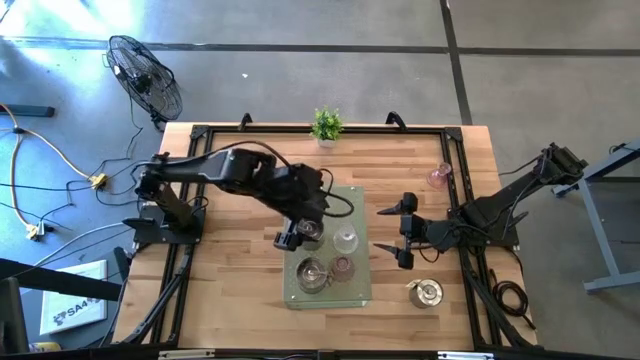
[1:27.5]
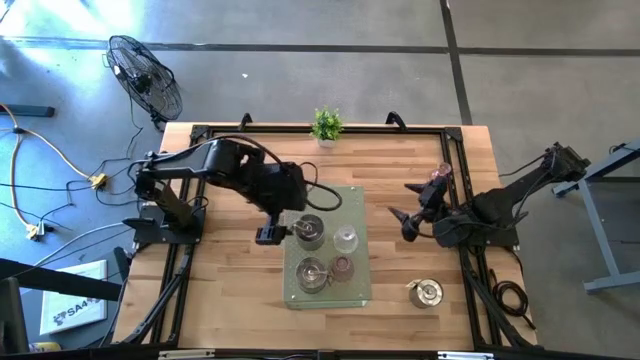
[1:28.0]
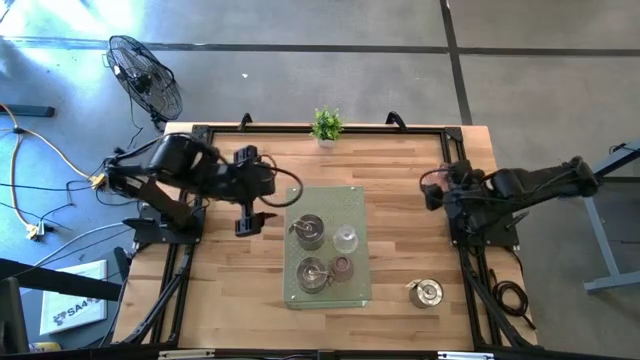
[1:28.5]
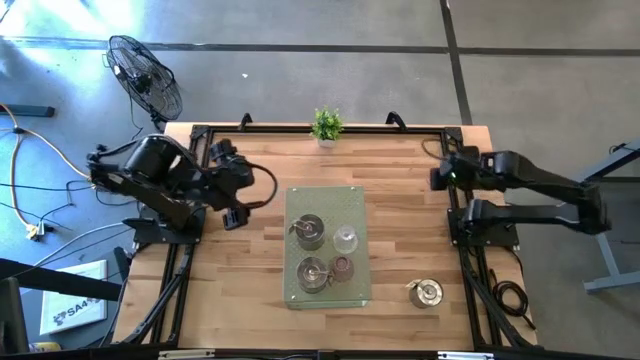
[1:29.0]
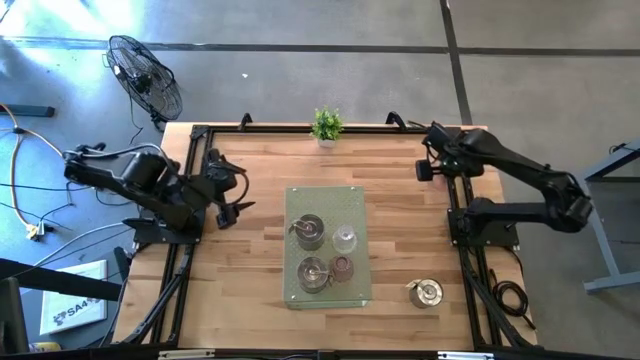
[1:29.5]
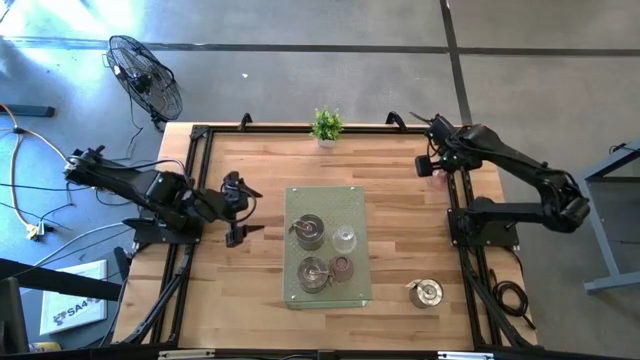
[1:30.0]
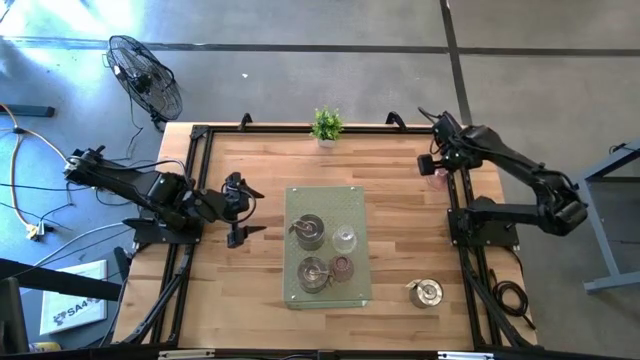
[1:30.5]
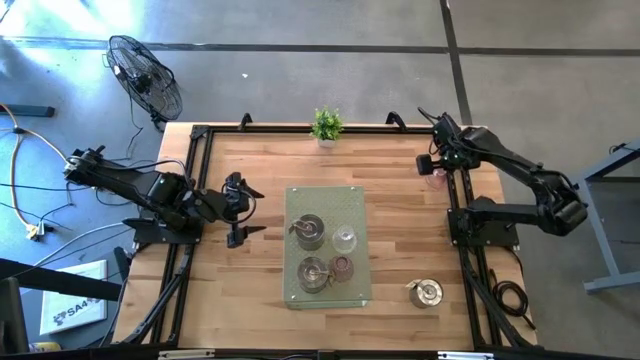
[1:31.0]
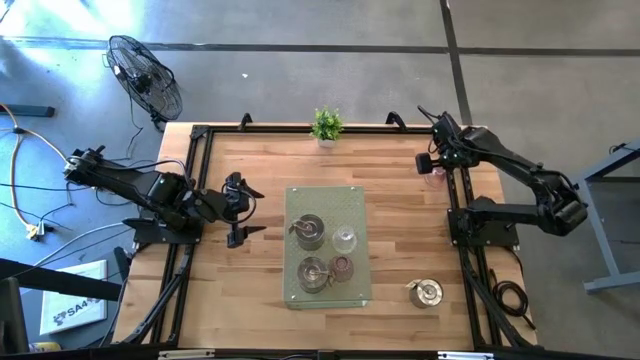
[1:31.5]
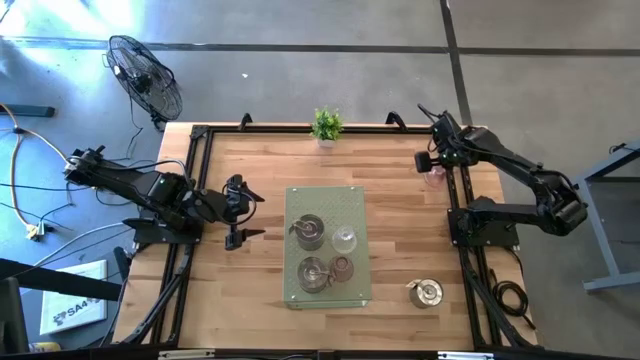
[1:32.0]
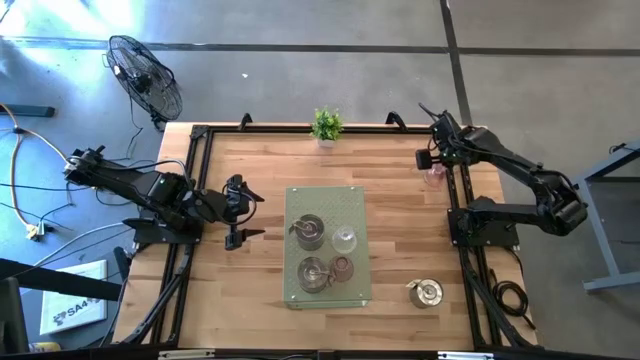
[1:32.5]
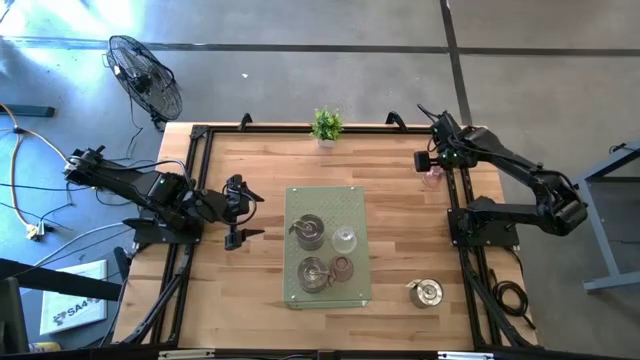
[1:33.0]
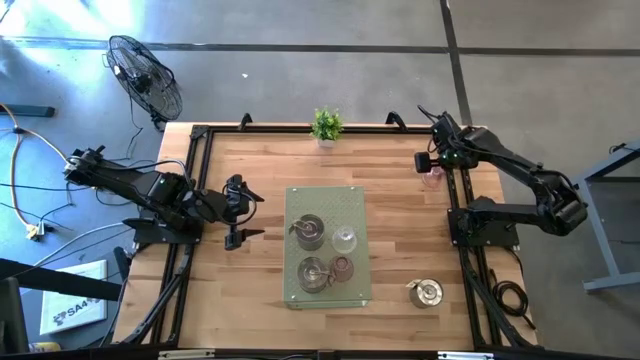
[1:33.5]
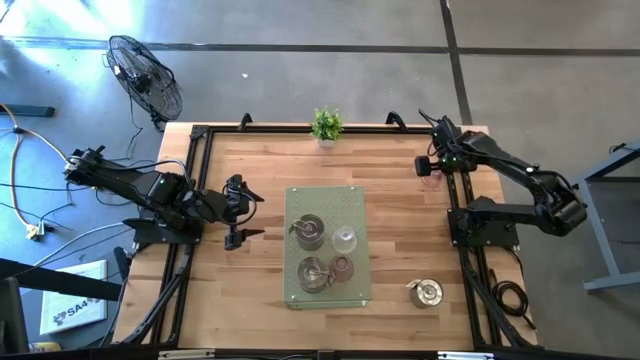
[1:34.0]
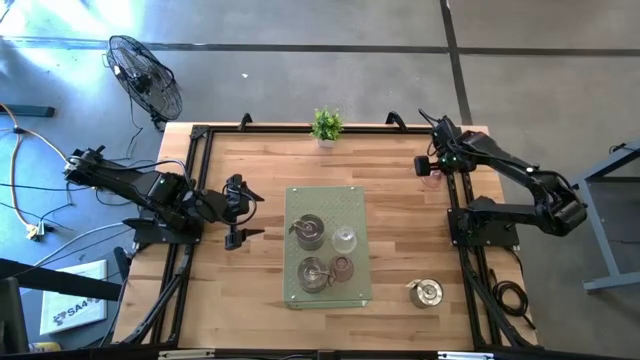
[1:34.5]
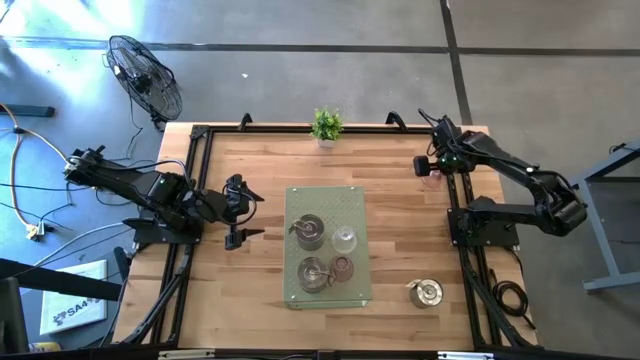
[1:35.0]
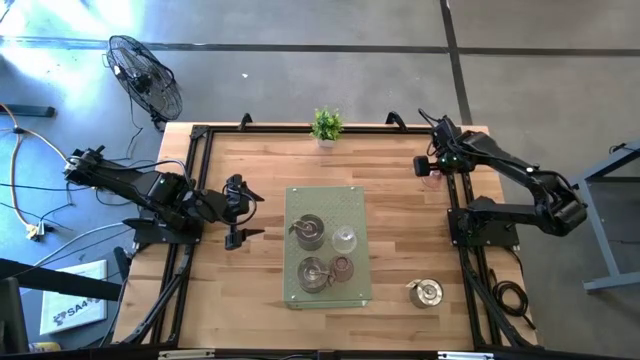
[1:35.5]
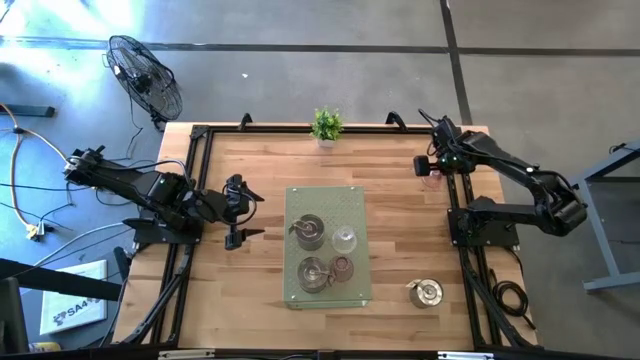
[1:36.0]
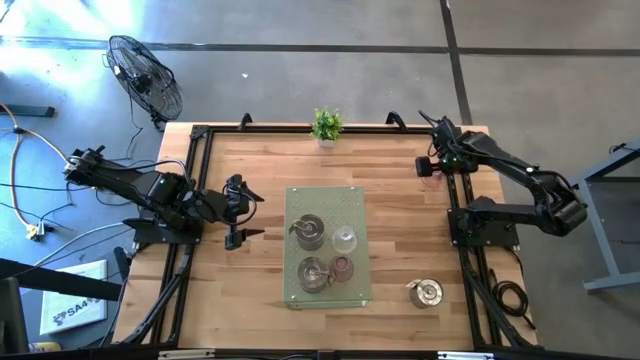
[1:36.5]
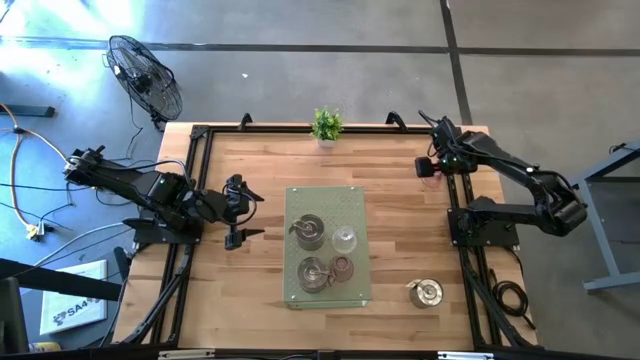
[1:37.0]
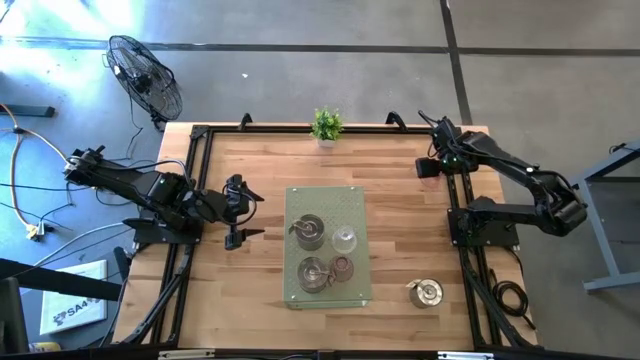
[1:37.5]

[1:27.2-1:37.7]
Task: Pick & Place candle stick holders
Put the purple candle holder on the shelf

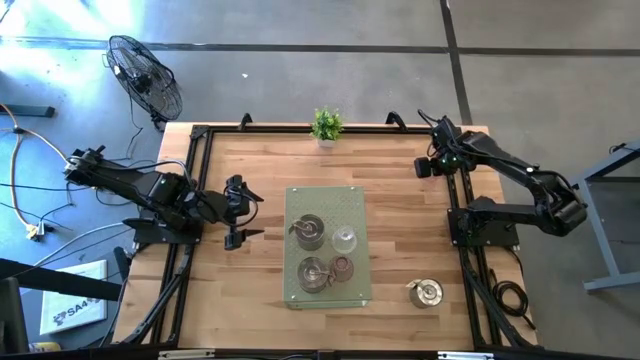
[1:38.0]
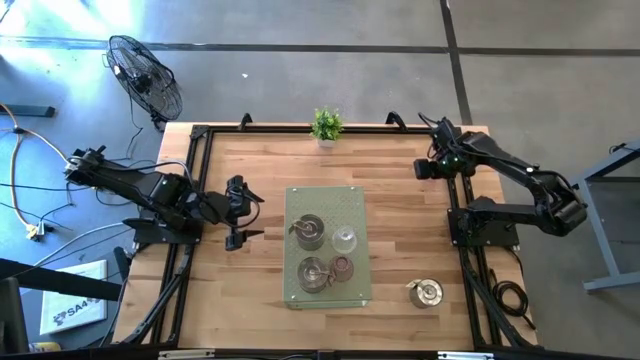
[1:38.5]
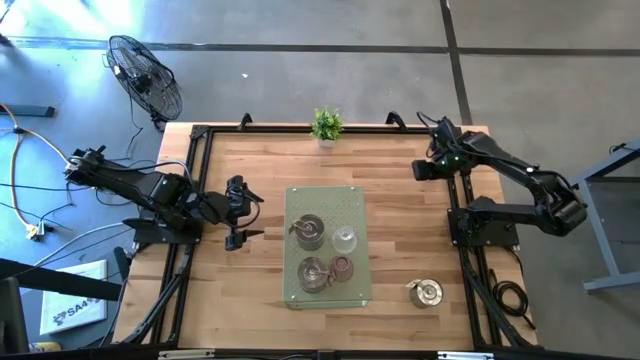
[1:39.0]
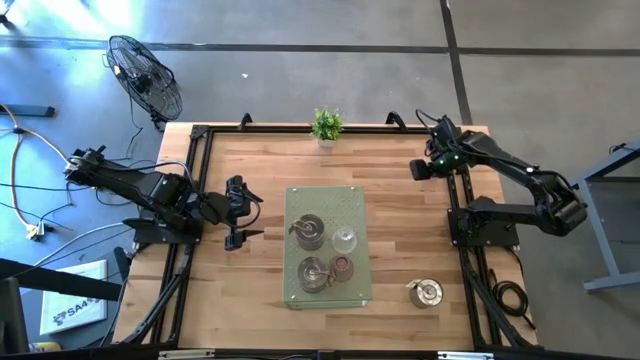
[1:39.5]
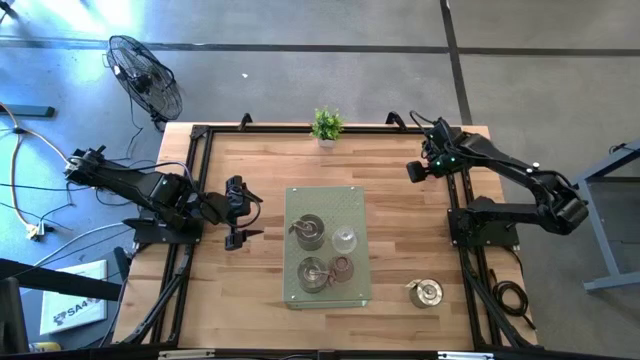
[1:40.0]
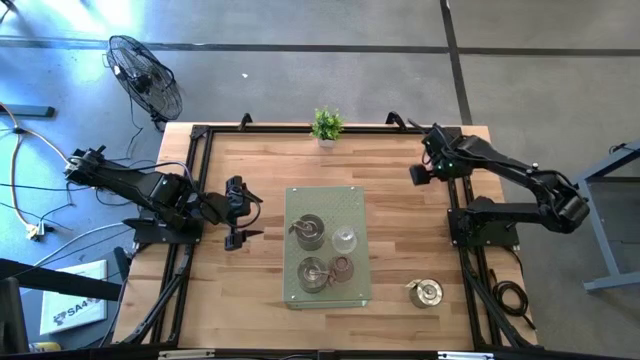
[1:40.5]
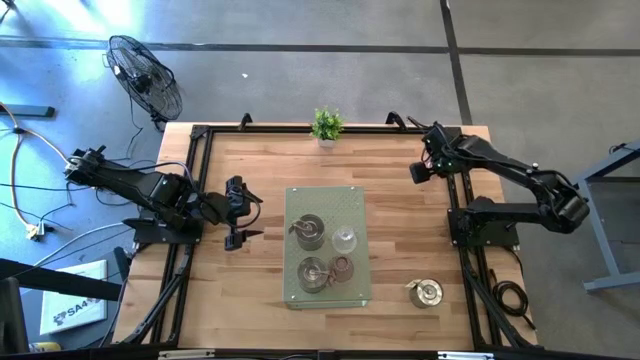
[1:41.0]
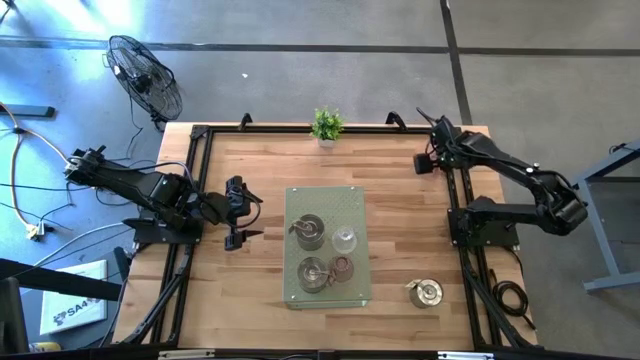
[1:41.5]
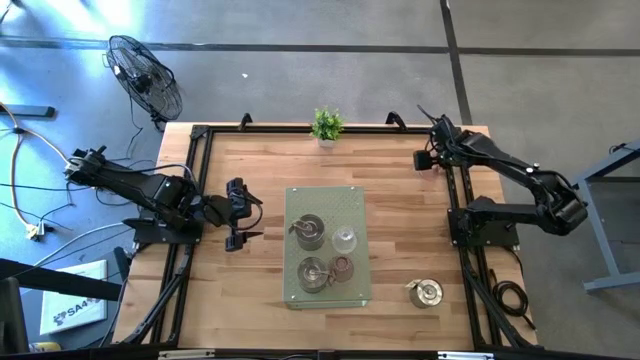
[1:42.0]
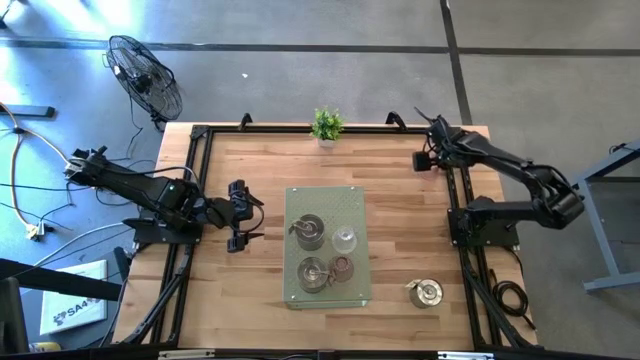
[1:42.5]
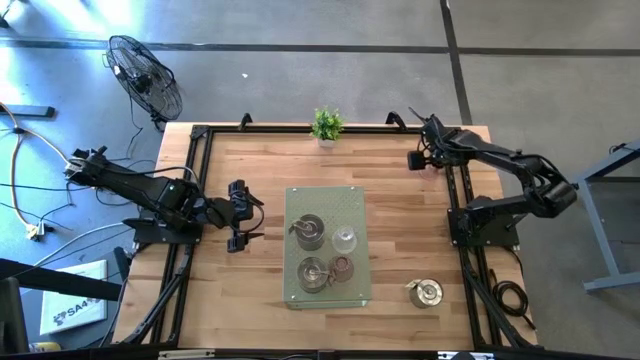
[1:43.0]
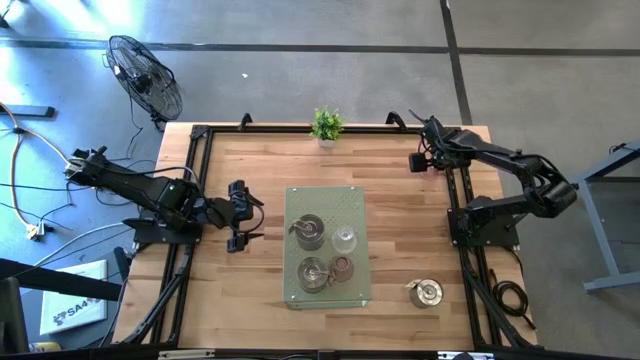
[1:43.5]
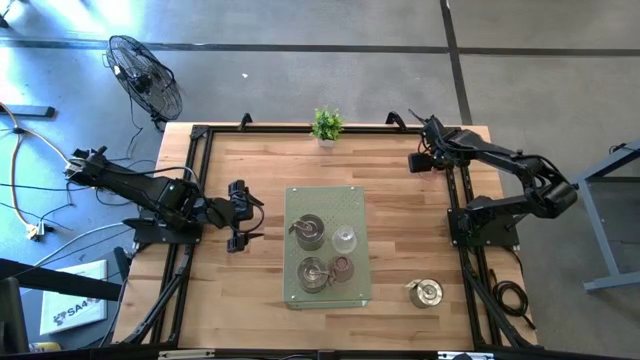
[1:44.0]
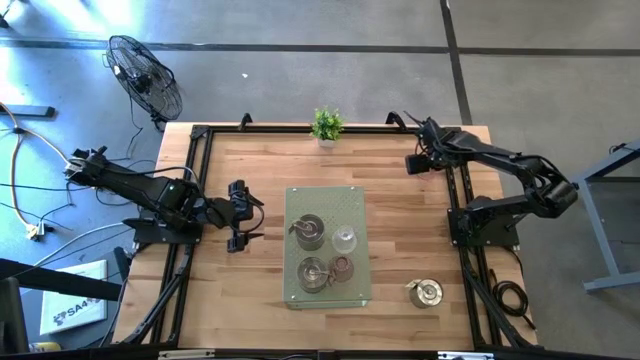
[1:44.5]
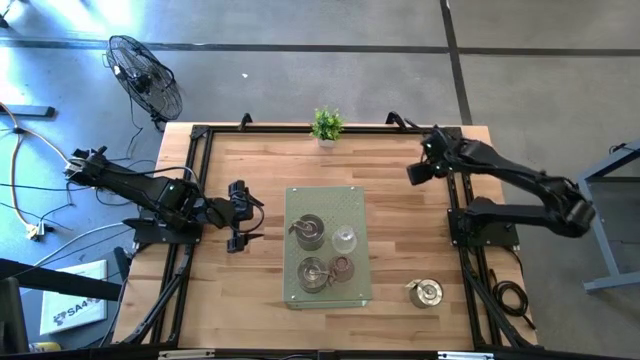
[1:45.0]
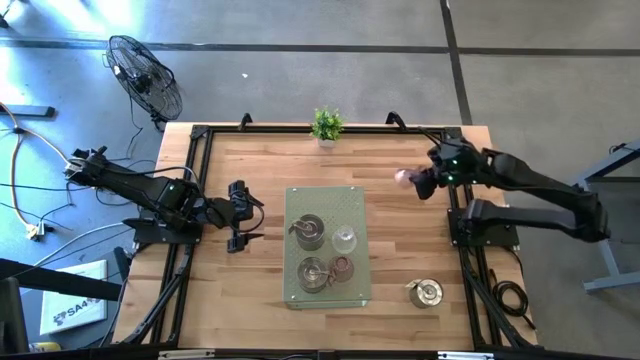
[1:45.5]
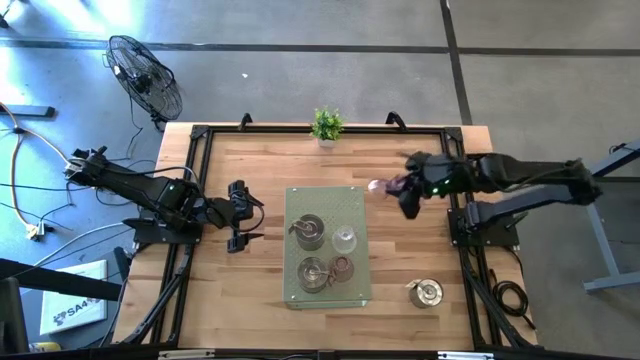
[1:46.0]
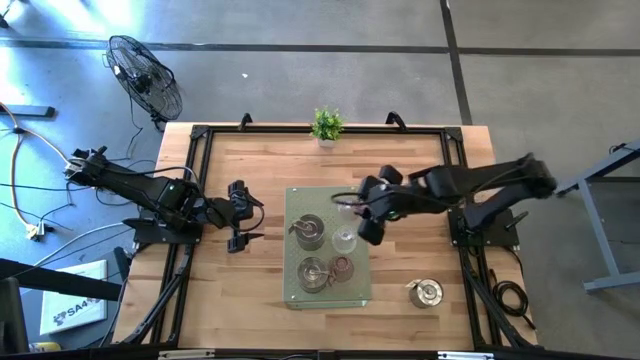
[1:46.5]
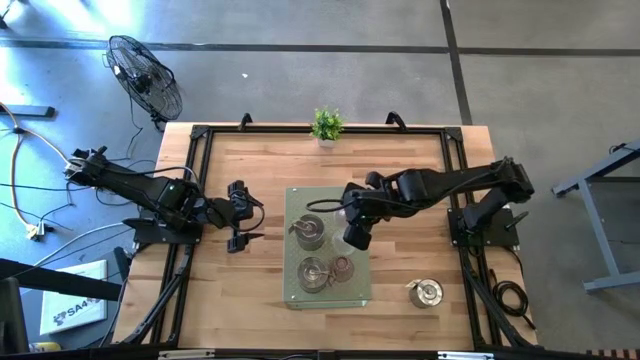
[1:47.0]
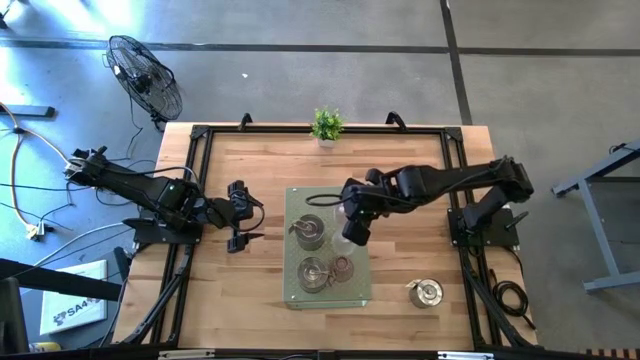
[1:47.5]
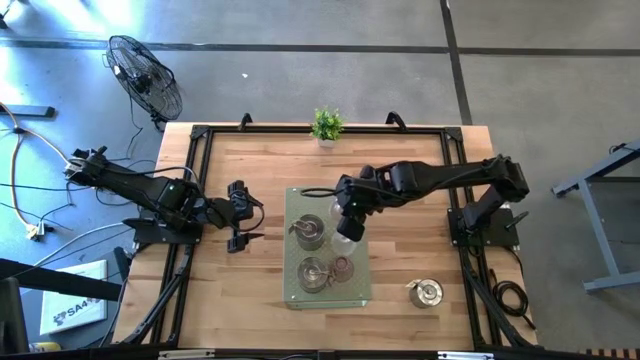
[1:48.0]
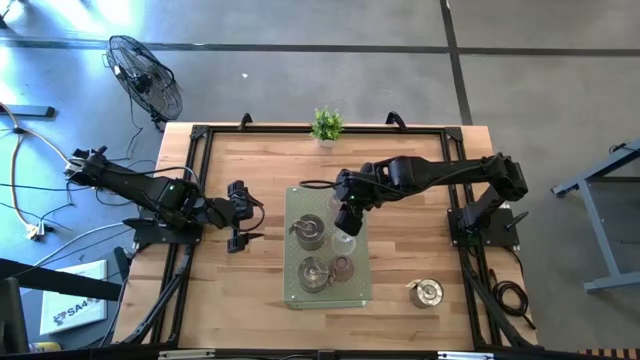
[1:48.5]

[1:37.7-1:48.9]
Put the purple candle holder on the shelf
